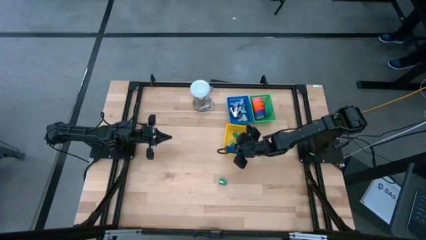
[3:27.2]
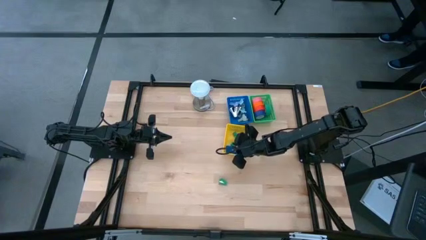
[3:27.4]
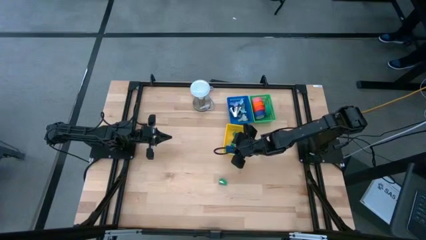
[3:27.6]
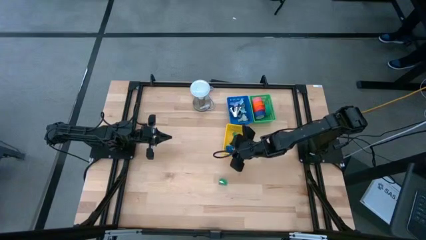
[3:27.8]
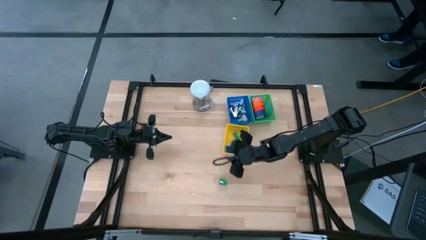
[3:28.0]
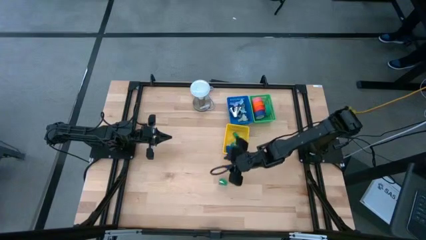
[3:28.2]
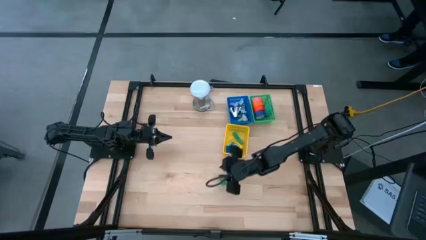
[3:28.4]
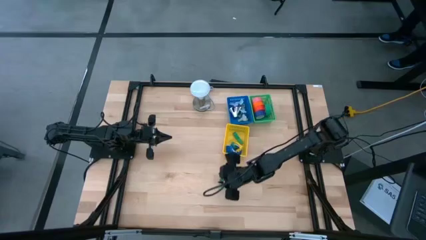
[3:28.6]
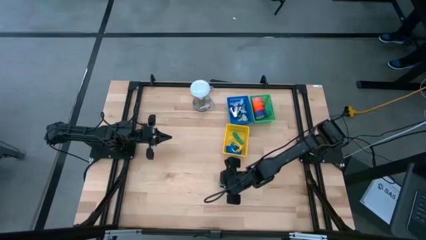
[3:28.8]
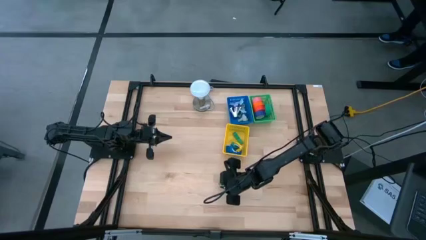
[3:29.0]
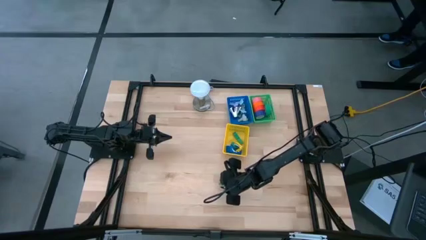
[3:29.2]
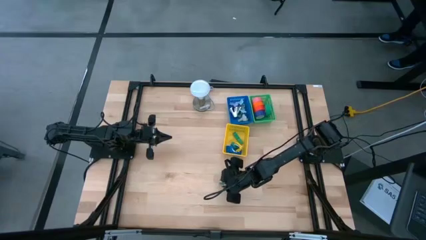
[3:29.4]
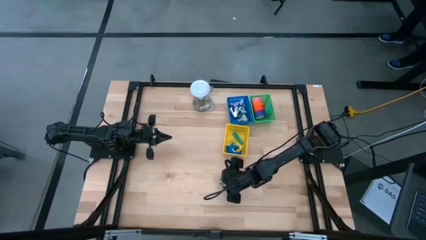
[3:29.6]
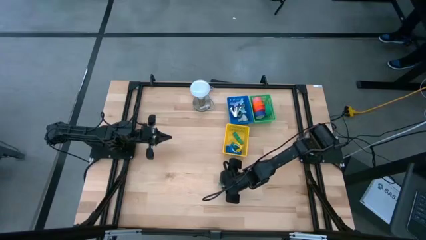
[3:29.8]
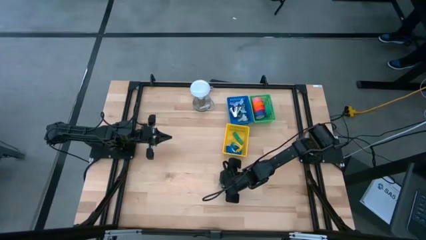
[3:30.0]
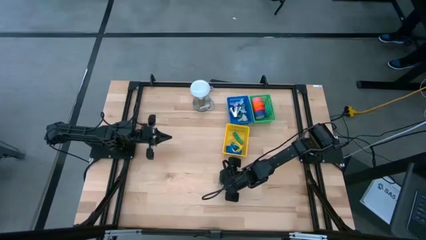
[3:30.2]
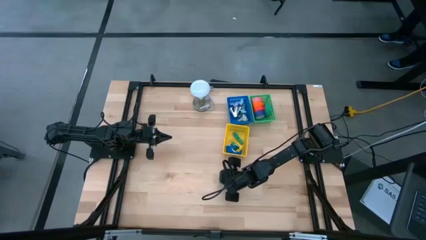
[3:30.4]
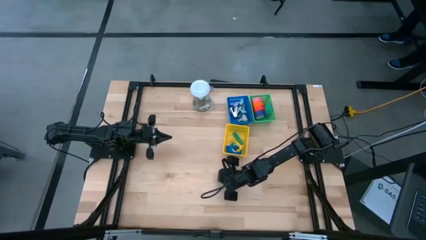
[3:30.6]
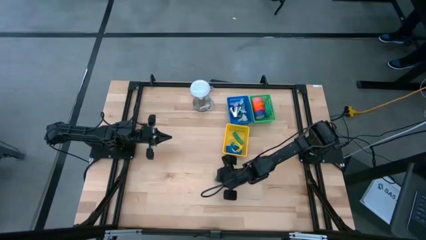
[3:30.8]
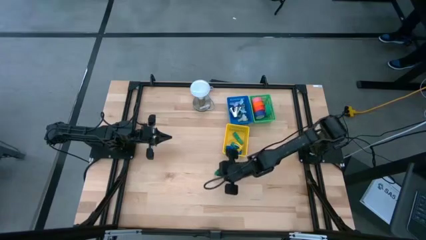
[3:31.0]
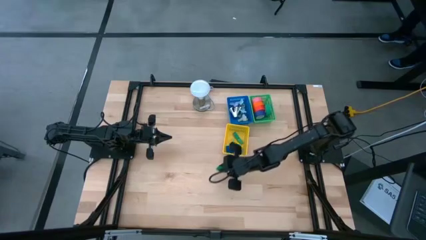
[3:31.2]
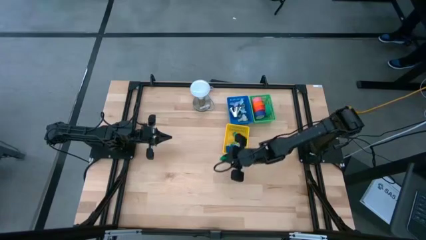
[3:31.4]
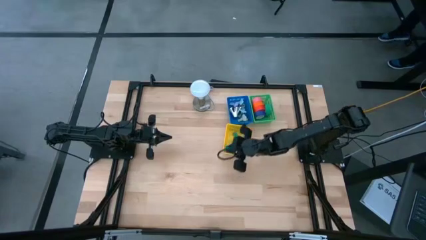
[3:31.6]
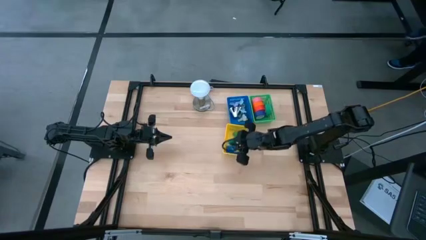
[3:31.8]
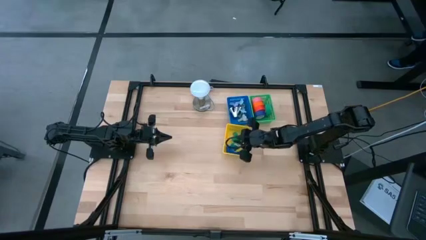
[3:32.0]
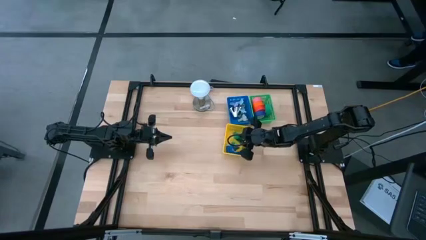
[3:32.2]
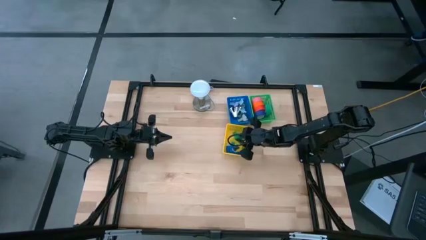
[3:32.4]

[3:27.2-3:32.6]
Task: Pick and place Stapler, Stapler remover, tape
Put the green stapler into the yellow bin

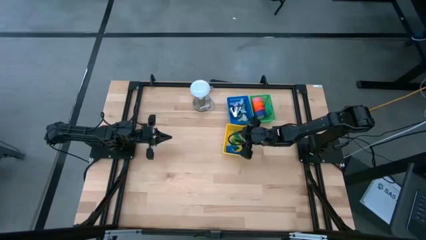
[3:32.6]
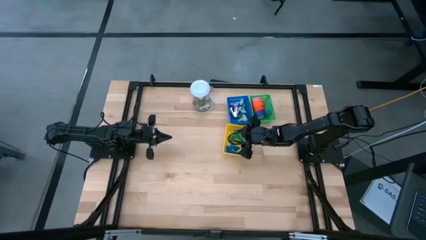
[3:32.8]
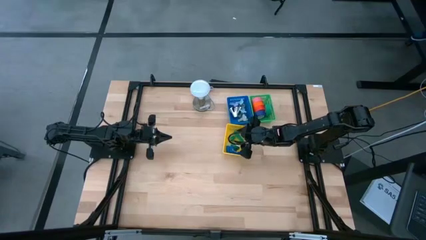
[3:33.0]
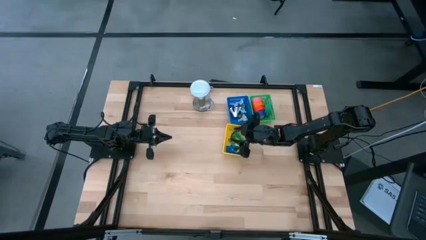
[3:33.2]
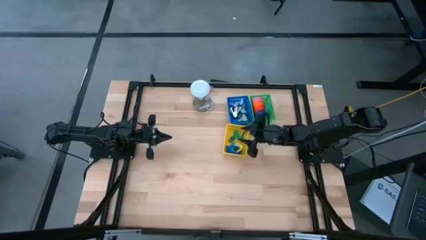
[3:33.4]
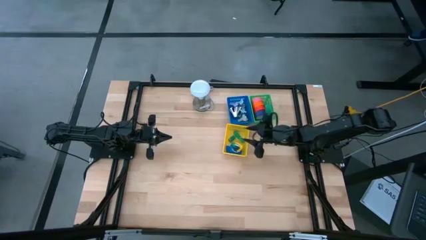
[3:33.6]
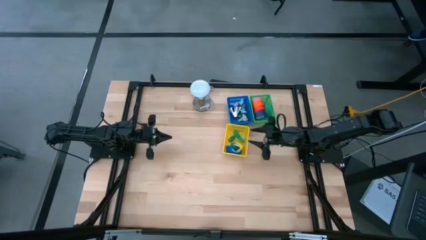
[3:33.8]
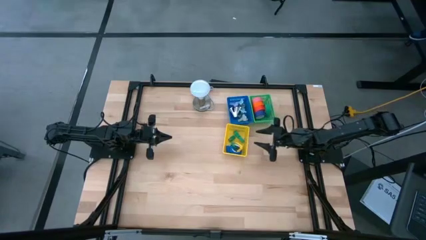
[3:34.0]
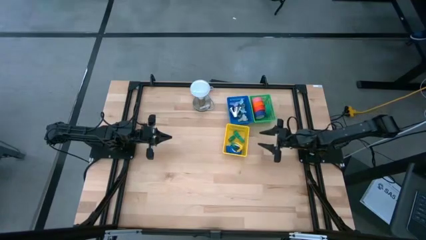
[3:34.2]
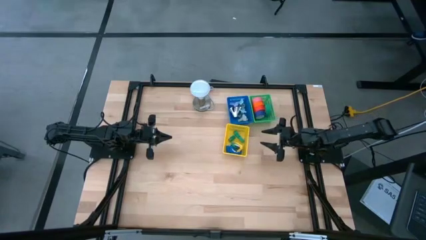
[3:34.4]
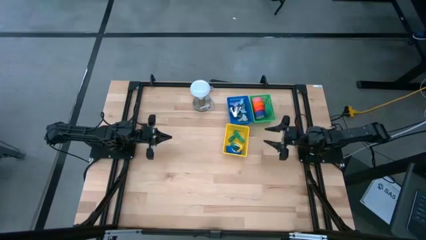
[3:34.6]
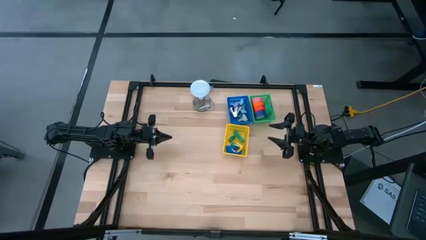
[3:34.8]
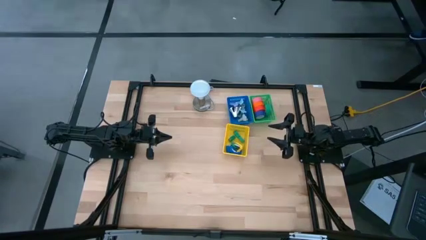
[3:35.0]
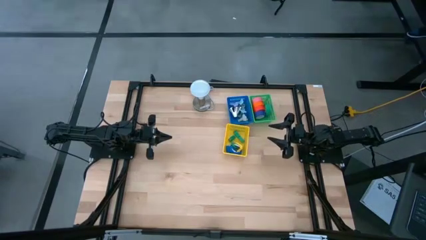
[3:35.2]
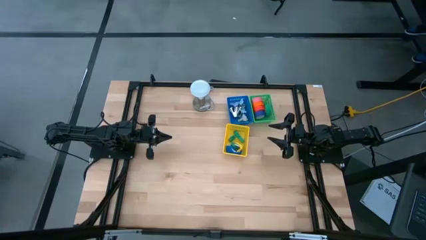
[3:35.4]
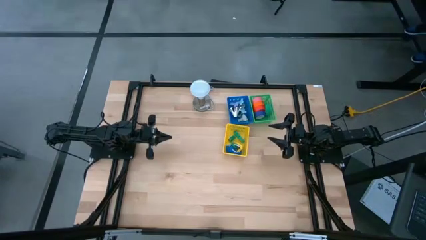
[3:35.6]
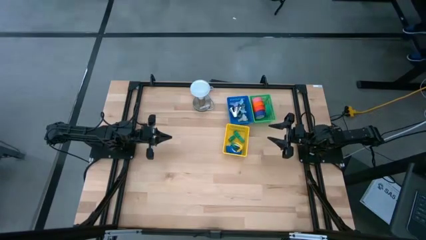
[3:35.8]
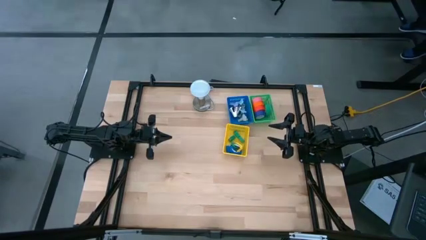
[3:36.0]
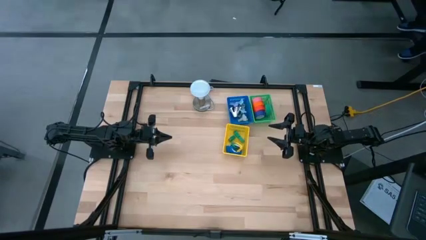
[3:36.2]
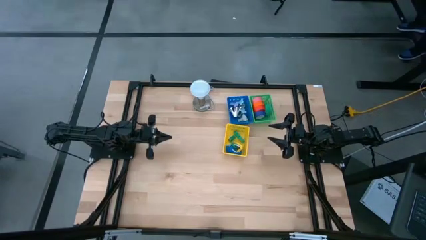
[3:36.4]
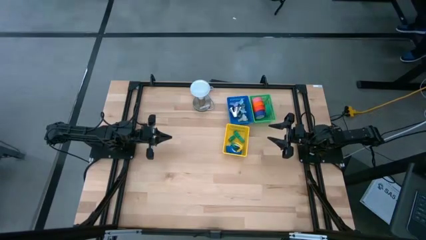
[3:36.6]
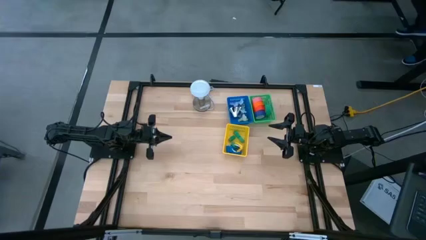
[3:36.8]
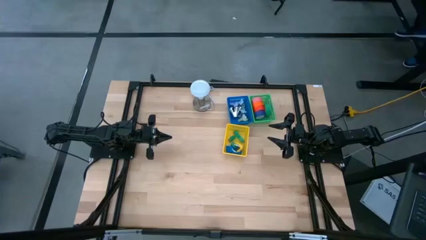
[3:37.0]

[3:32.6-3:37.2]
Return to Home Position

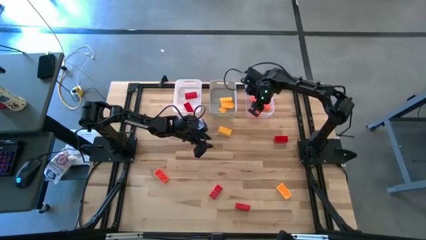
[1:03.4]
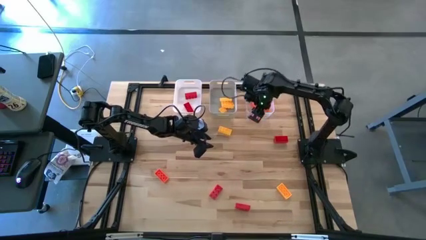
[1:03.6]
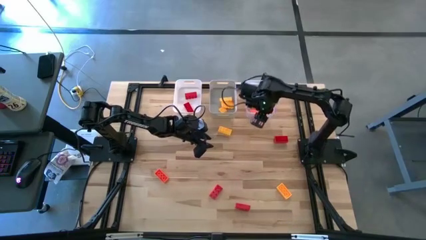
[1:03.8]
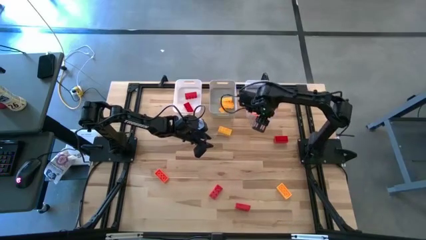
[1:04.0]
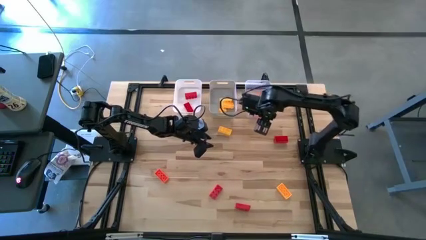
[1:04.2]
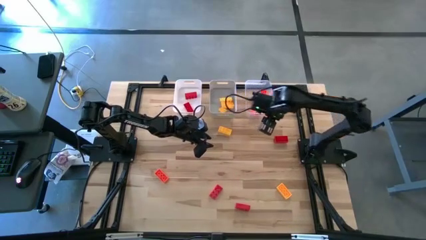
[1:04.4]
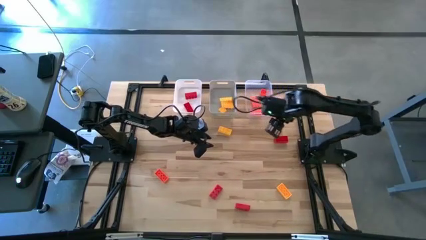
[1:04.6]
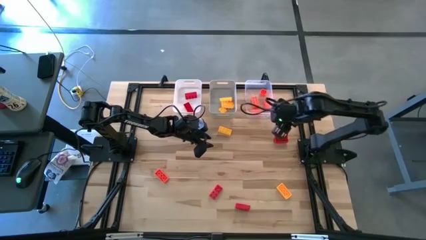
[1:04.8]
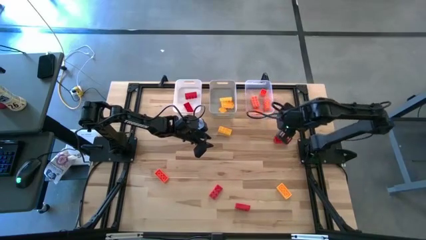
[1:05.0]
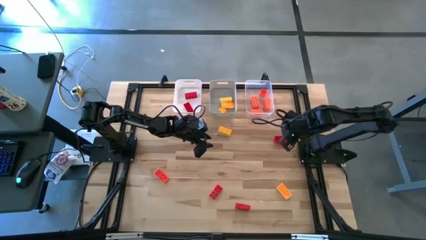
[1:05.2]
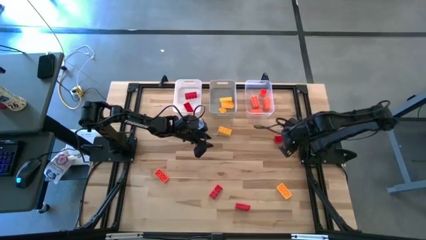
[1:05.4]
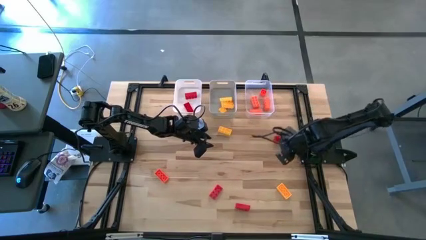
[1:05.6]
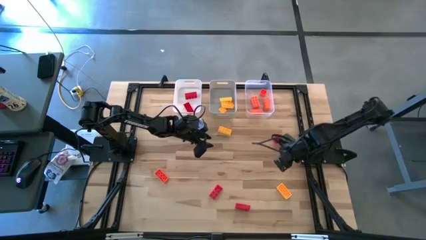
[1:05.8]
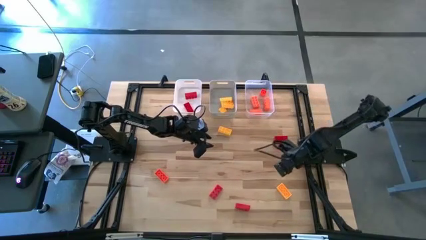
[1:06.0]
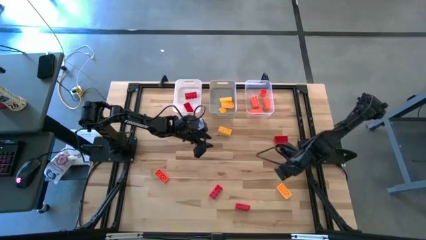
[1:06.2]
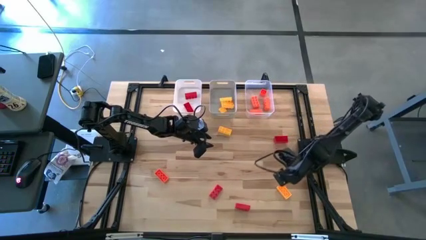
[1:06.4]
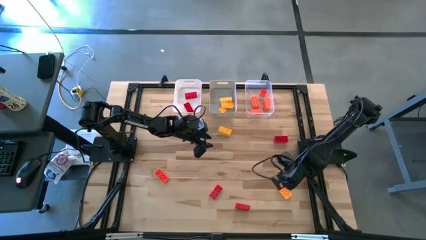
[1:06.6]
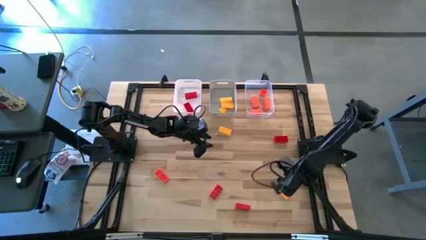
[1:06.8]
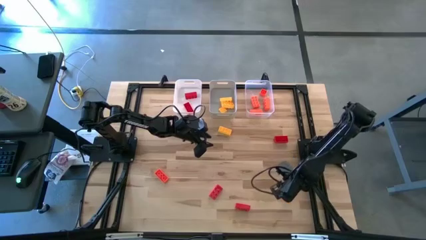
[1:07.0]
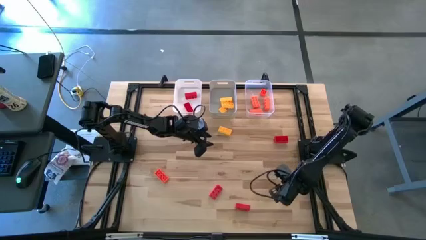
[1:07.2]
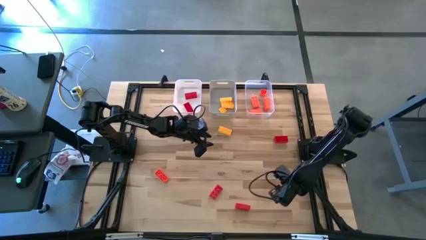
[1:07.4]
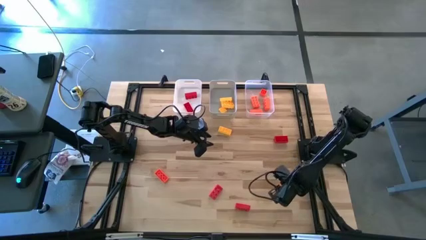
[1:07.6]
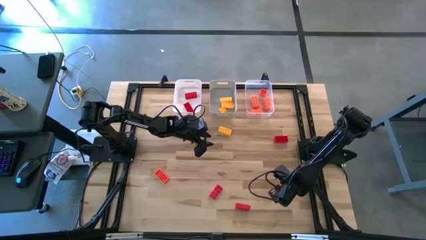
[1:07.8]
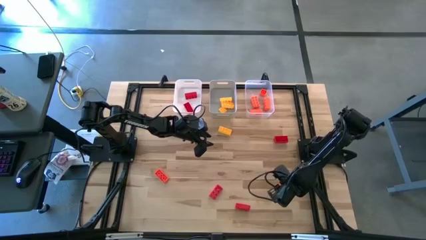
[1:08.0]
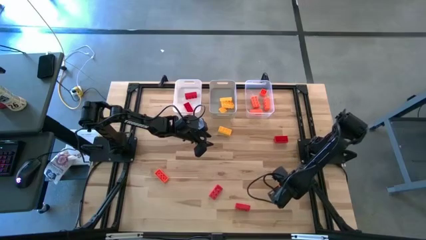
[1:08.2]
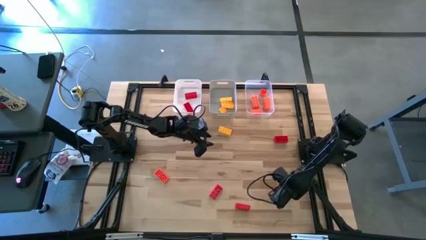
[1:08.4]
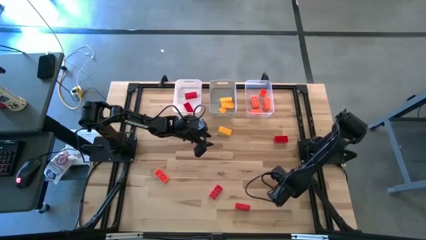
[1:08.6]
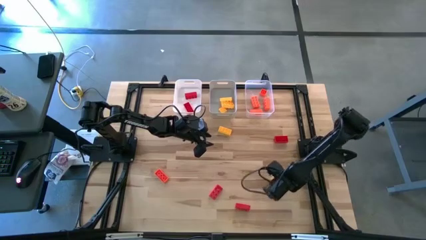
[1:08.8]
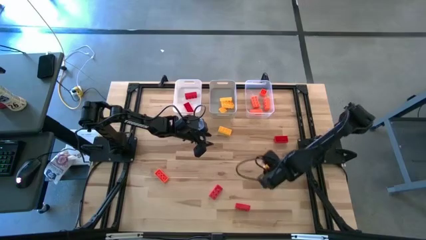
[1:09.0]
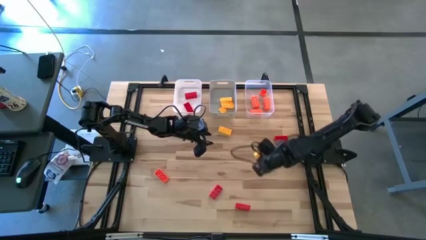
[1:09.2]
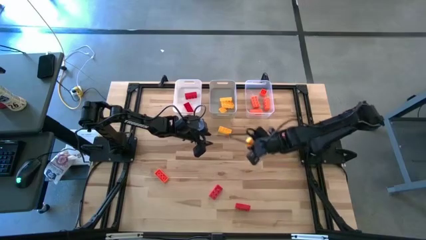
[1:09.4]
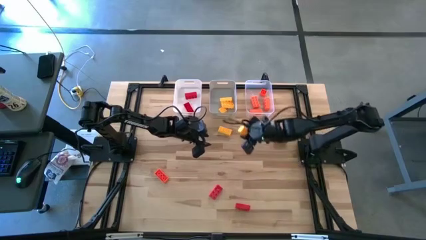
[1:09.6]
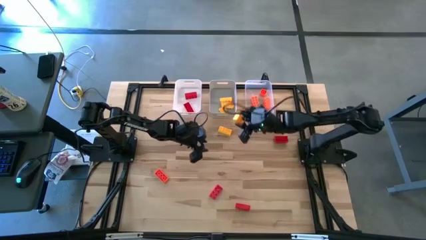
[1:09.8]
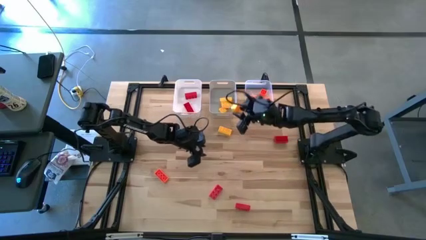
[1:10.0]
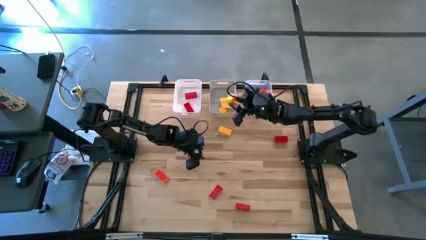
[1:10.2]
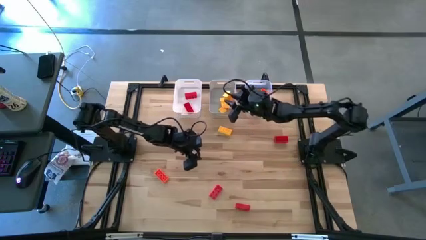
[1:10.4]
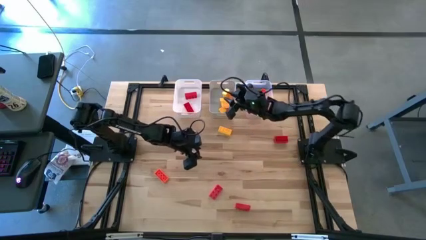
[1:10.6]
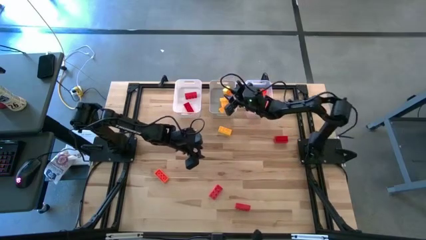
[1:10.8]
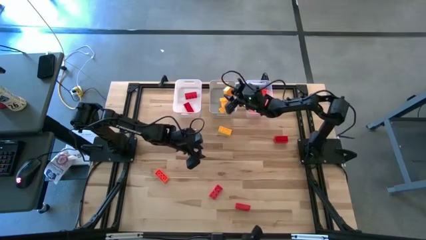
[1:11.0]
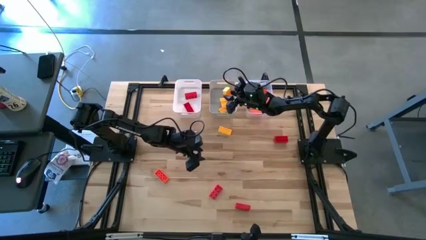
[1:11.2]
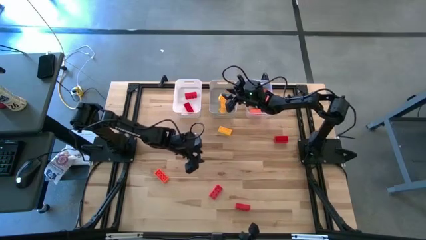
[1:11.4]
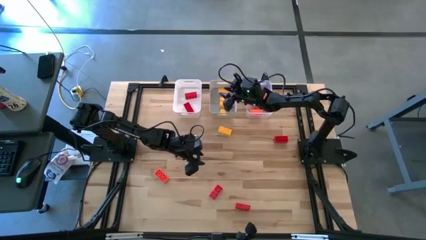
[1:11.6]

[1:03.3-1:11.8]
Task: Sort & place blocks by color
Put the yellow game piece into the gray bin
